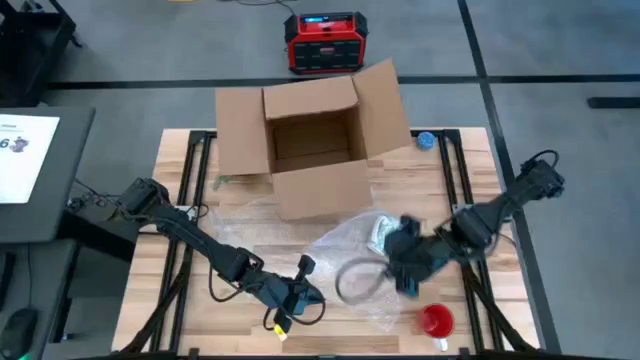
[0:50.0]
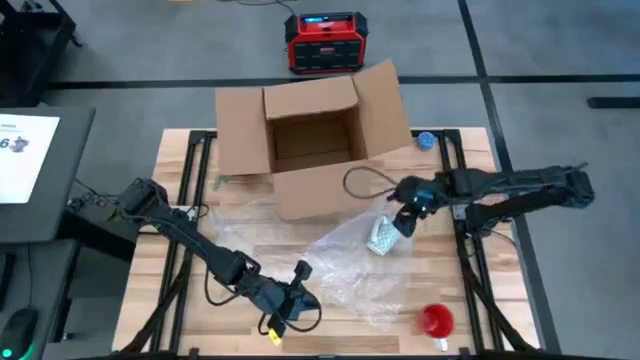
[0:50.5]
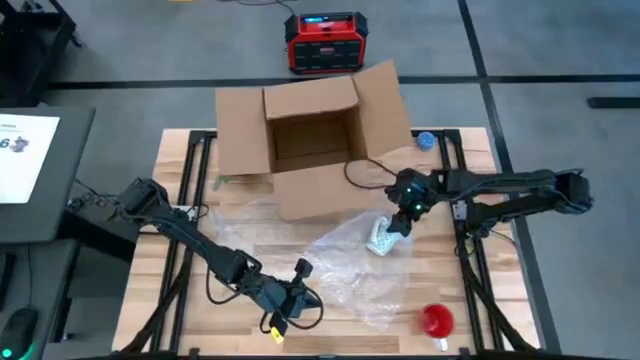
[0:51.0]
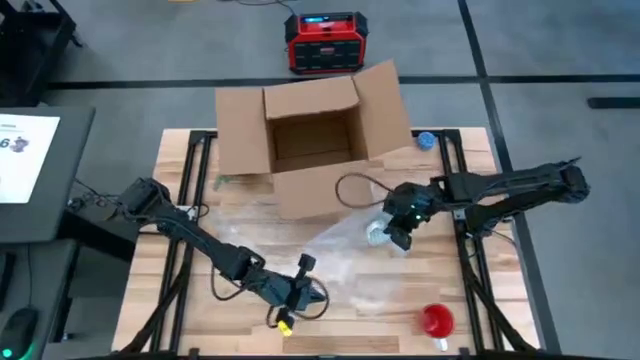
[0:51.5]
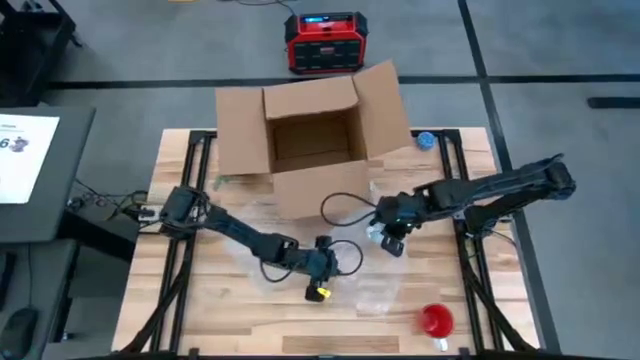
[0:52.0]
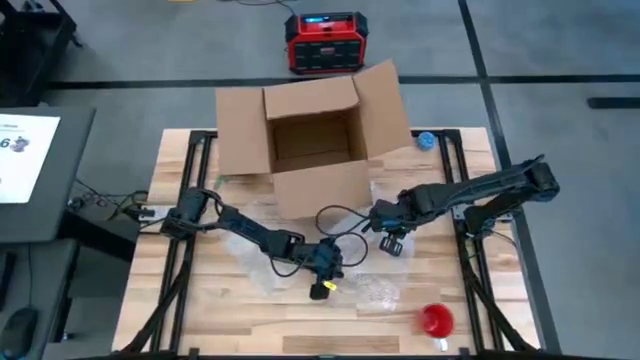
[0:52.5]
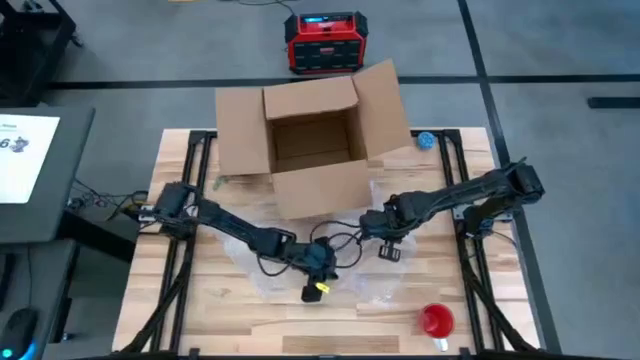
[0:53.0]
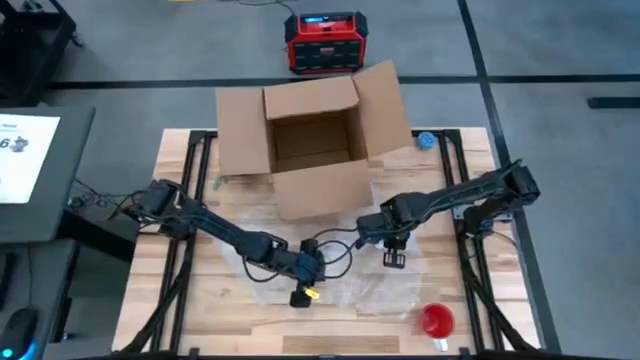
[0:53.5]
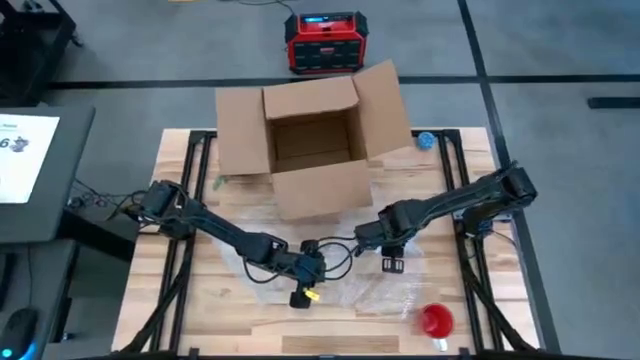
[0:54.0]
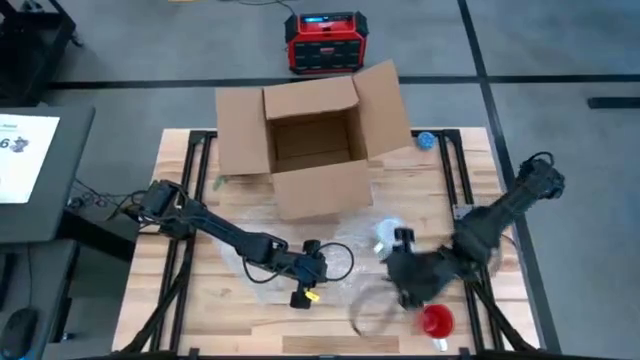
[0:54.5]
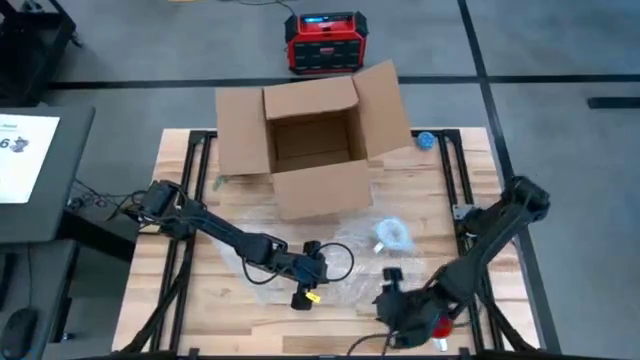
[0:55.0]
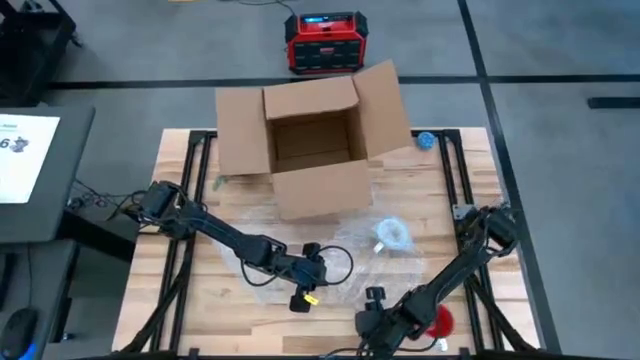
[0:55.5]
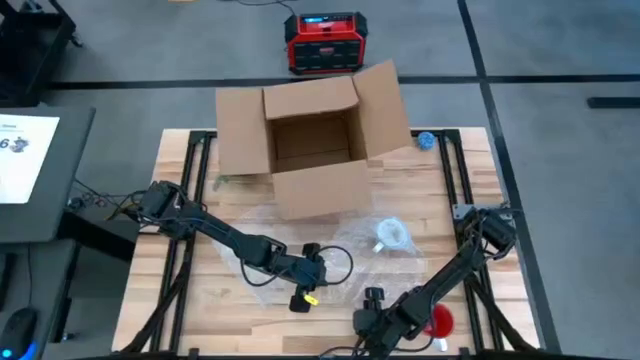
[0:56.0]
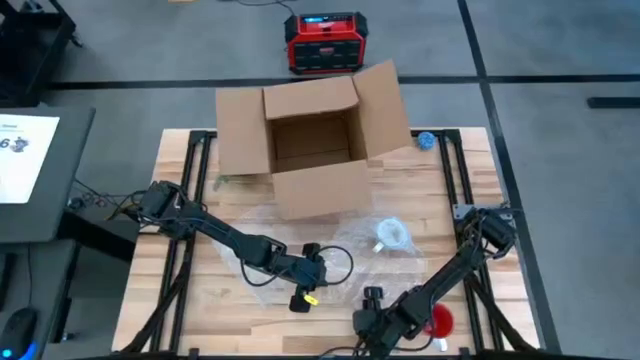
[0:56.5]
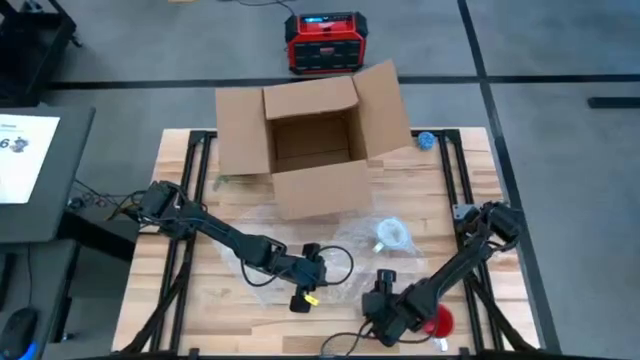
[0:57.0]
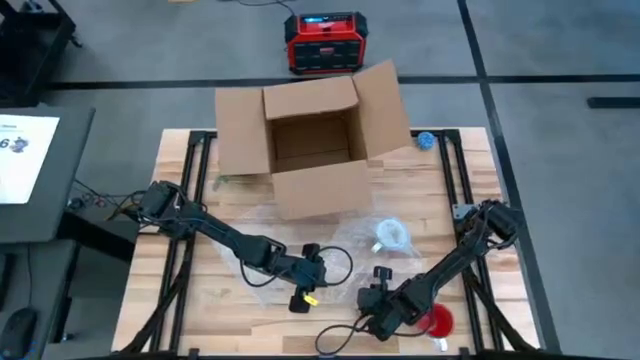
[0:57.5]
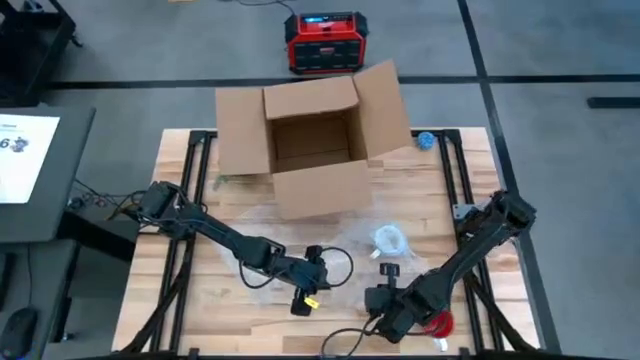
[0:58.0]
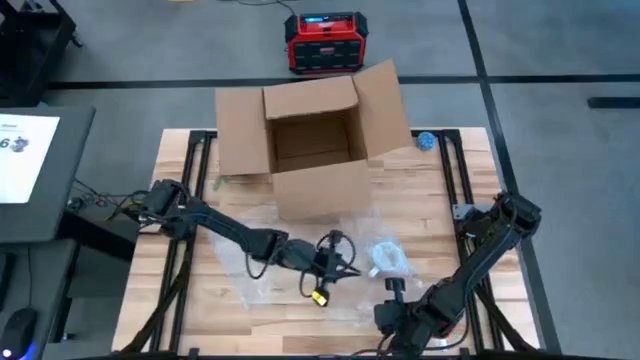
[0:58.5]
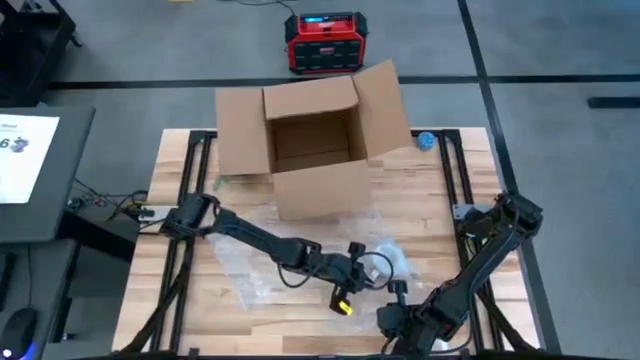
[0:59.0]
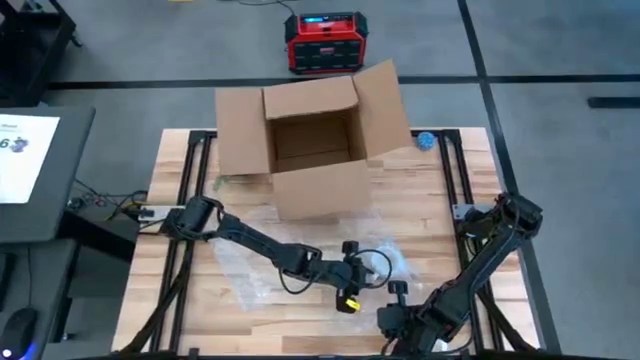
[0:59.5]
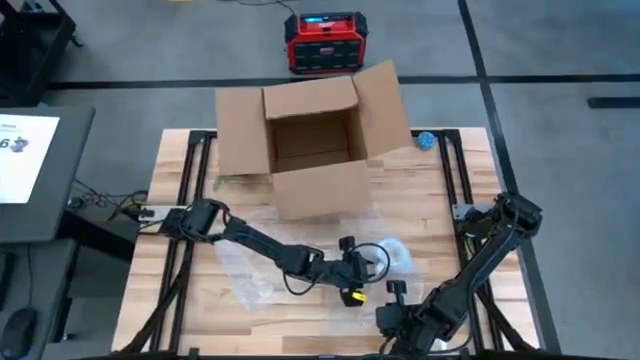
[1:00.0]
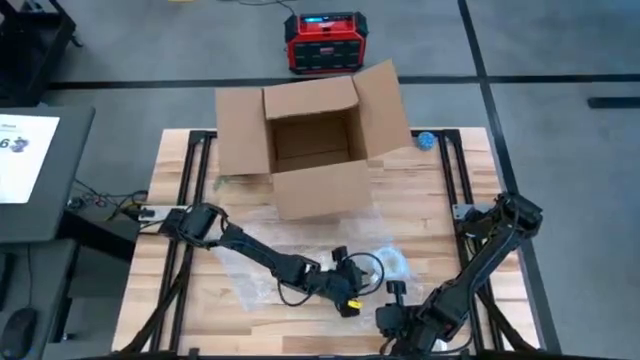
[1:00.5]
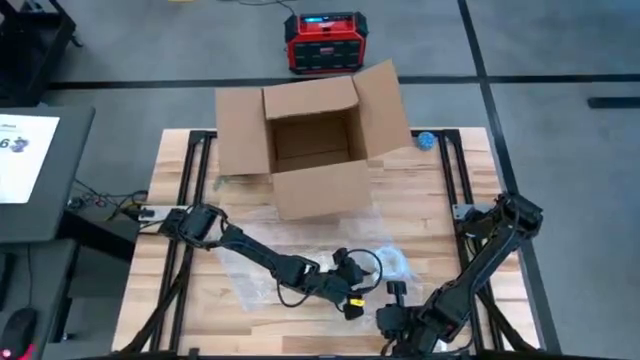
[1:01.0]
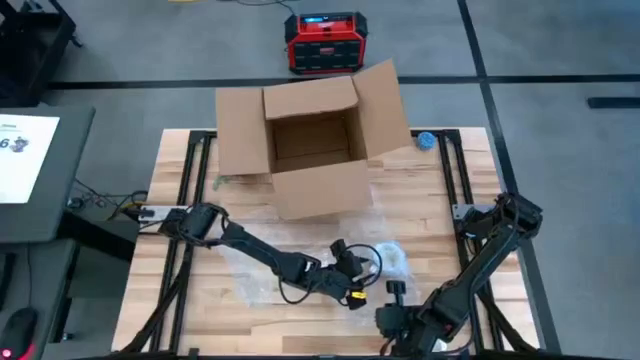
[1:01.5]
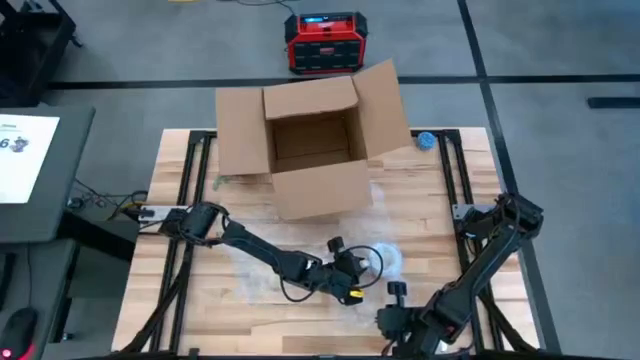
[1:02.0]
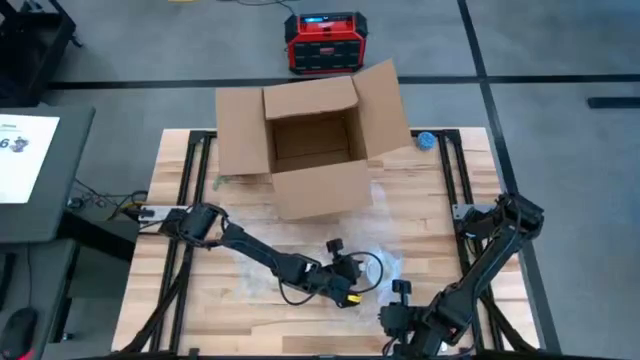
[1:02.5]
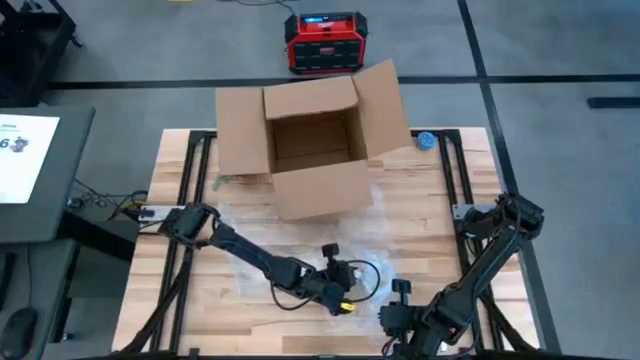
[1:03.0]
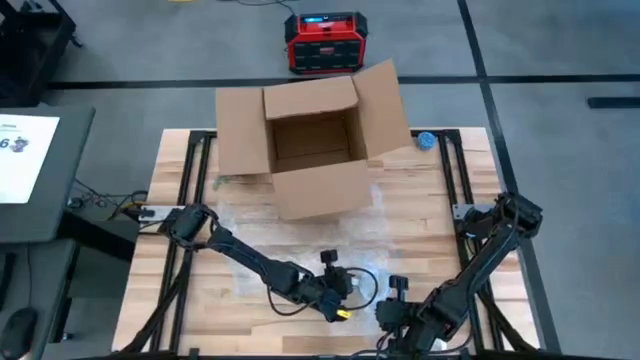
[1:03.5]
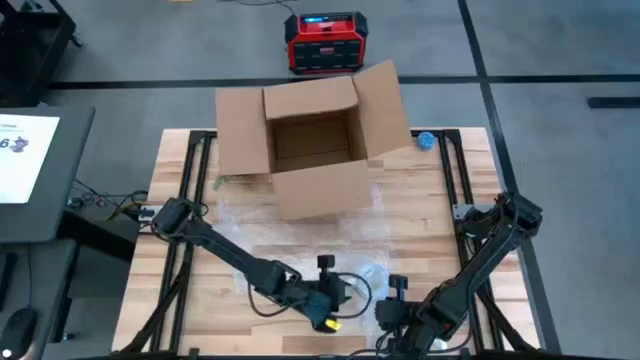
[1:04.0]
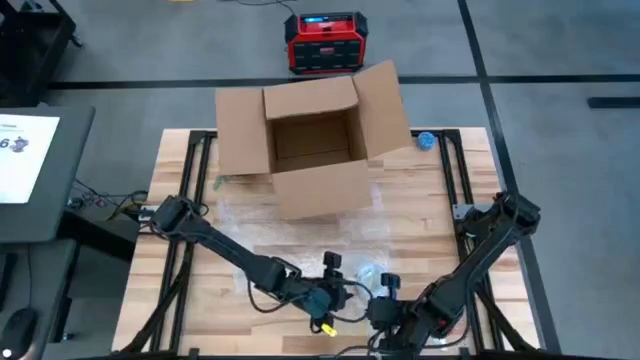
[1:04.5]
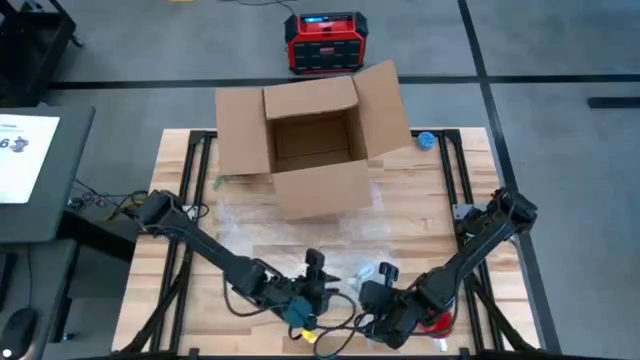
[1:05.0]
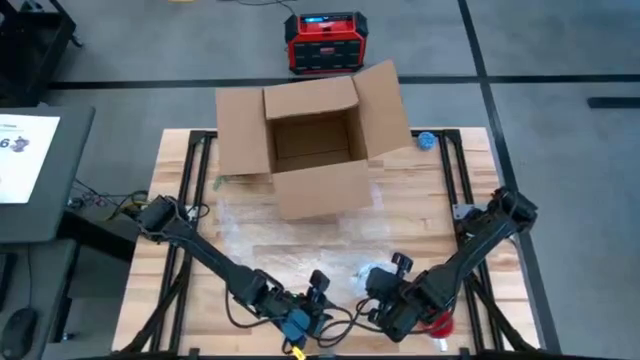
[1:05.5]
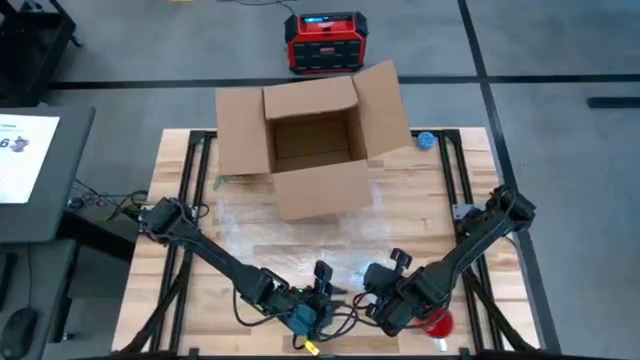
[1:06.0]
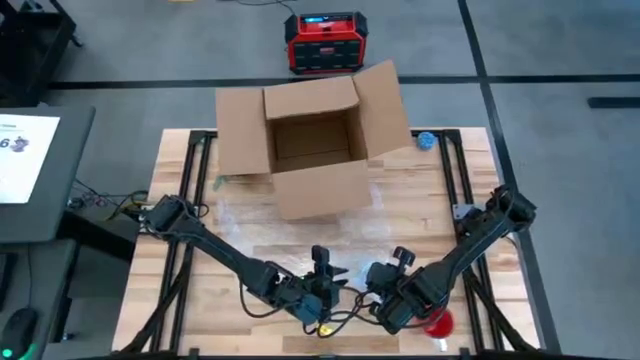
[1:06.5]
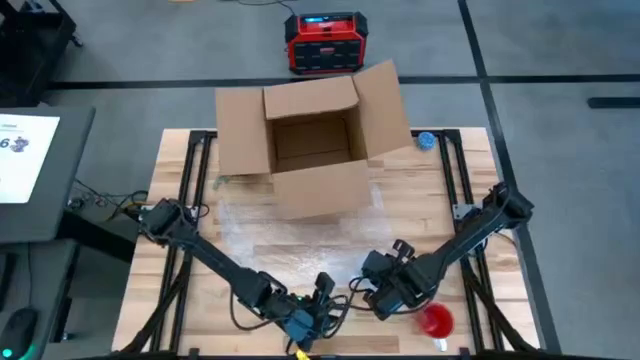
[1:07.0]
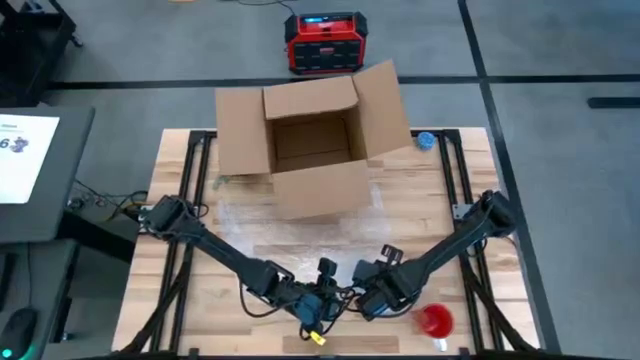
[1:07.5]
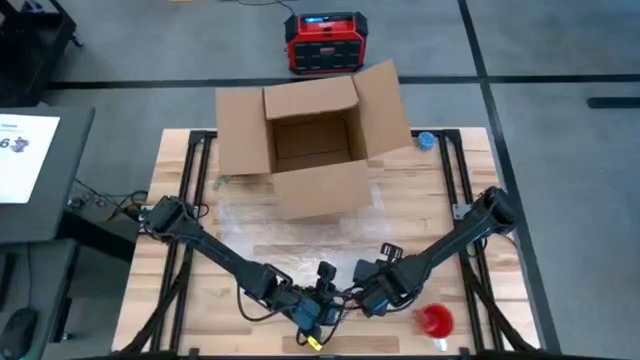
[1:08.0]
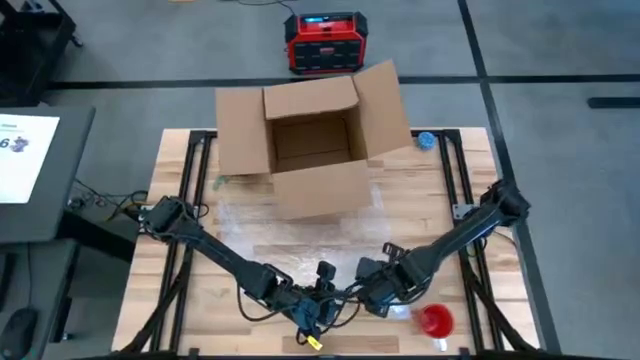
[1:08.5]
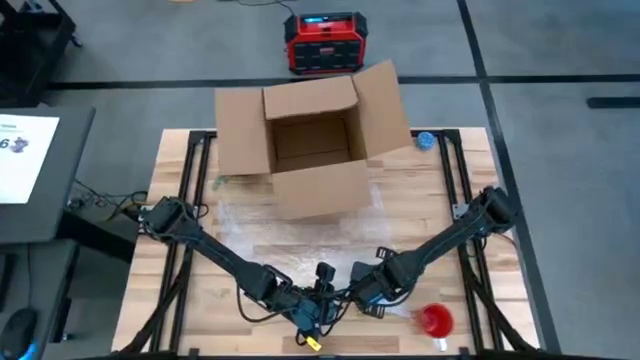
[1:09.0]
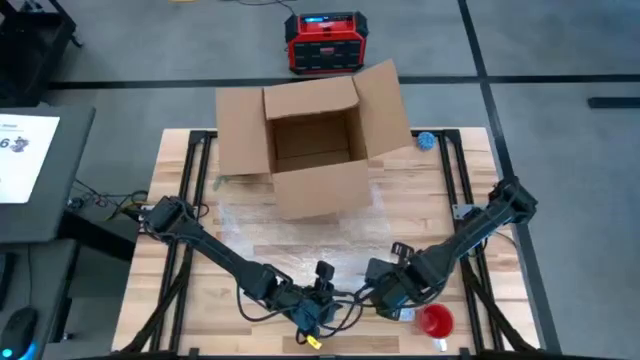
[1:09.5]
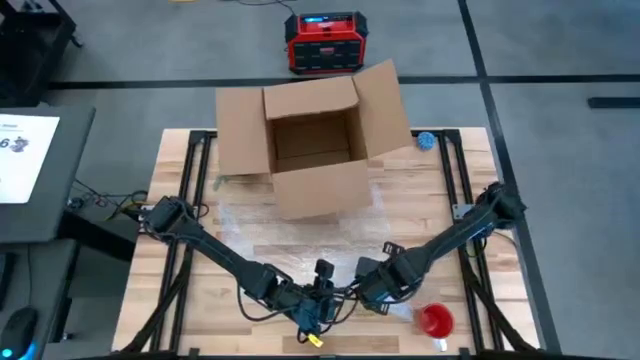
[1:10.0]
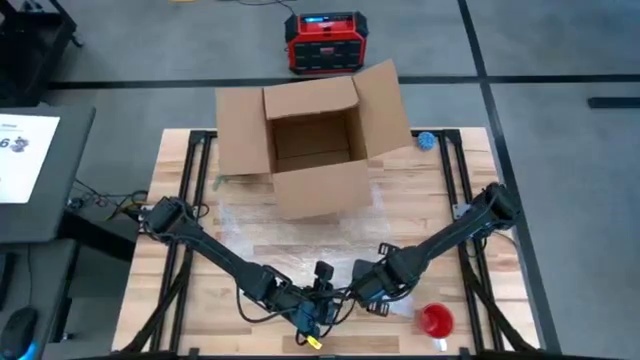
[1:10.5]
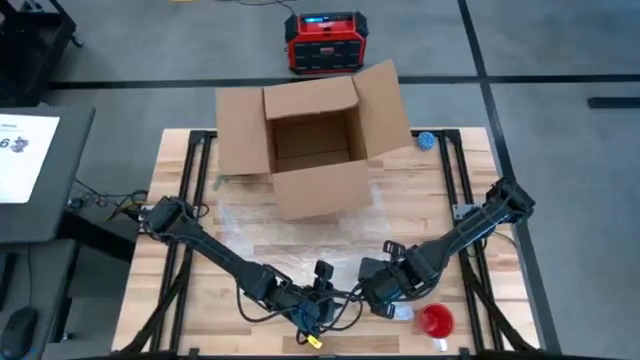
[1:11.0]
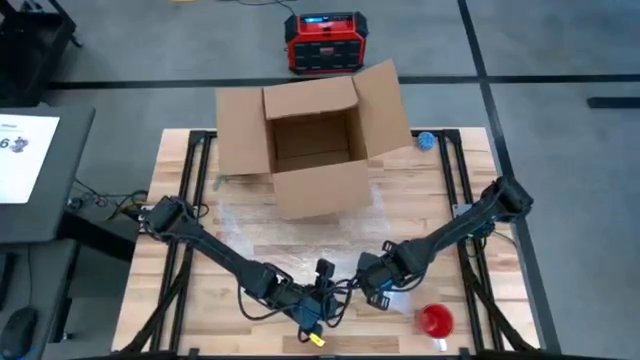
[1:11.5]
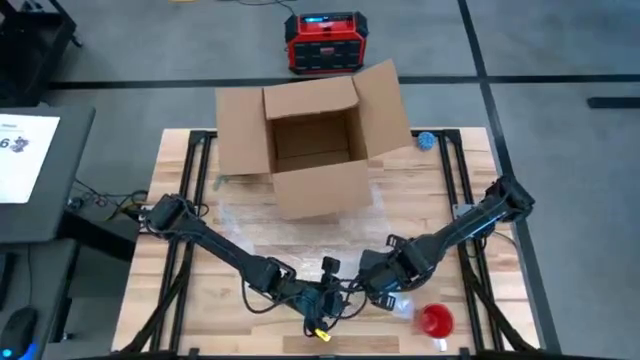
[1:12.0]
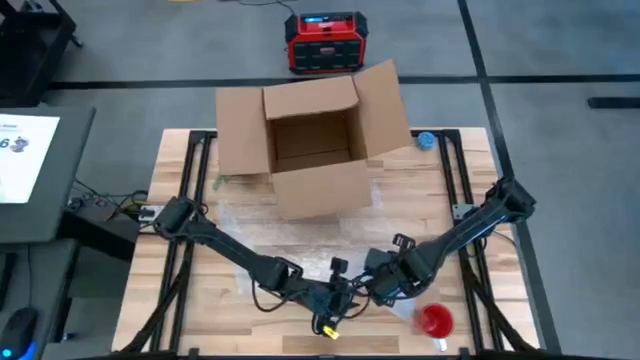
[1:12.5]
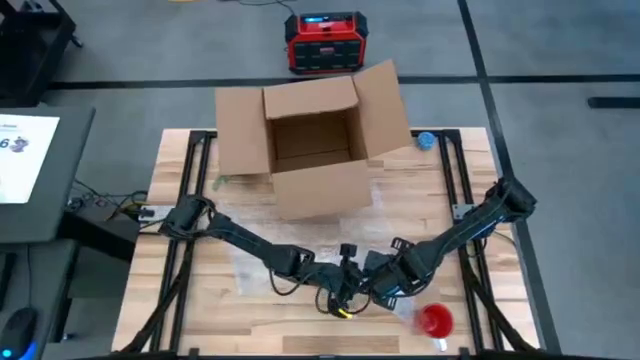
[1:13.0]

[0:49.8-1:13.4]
Task: wrap mug
Wrap the green patterned mug into the bubble wrap
